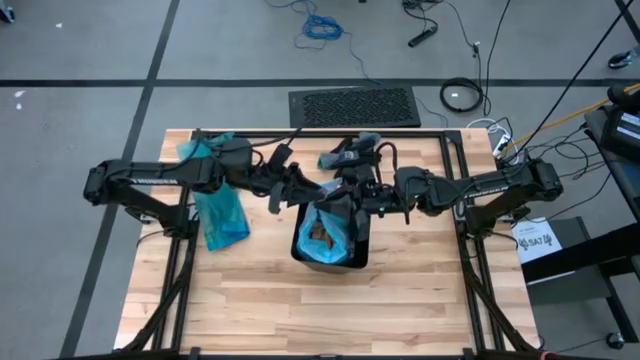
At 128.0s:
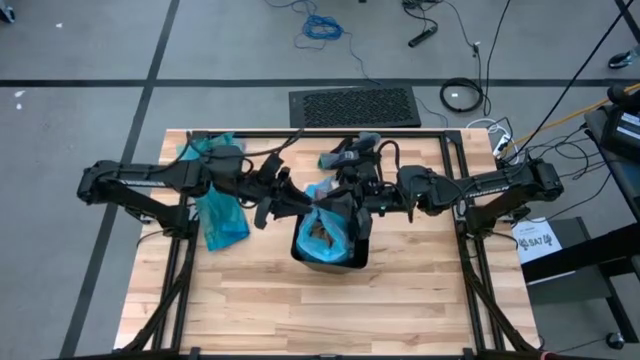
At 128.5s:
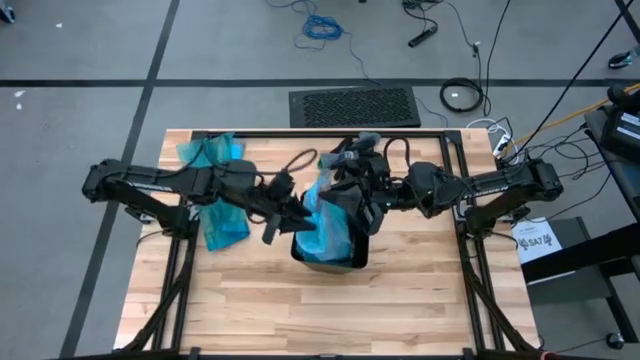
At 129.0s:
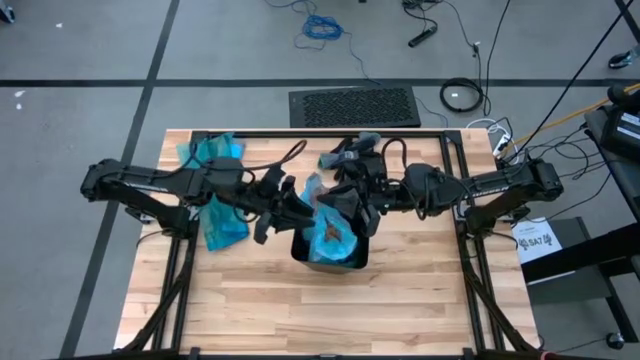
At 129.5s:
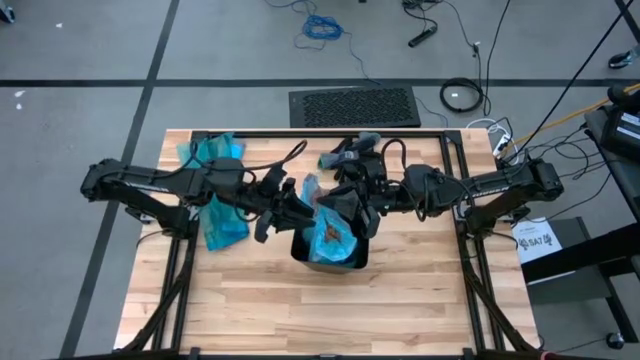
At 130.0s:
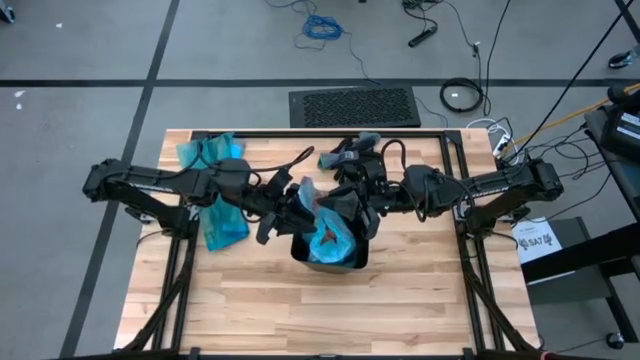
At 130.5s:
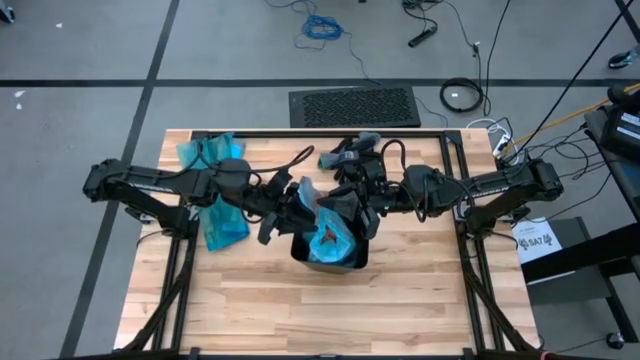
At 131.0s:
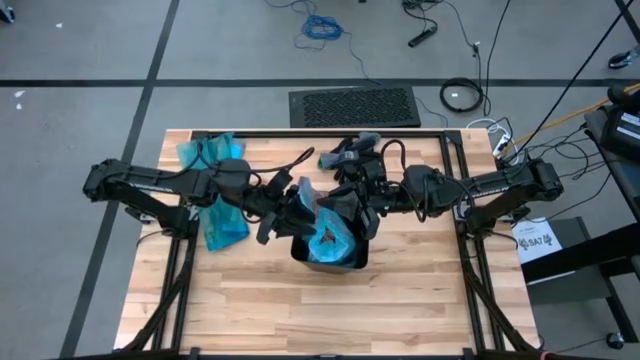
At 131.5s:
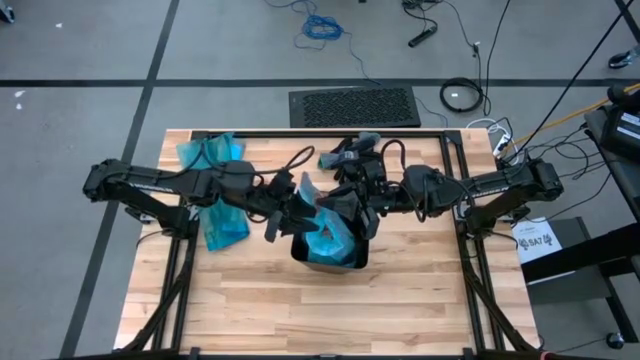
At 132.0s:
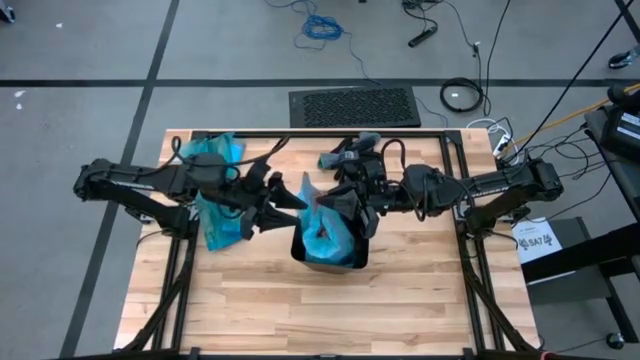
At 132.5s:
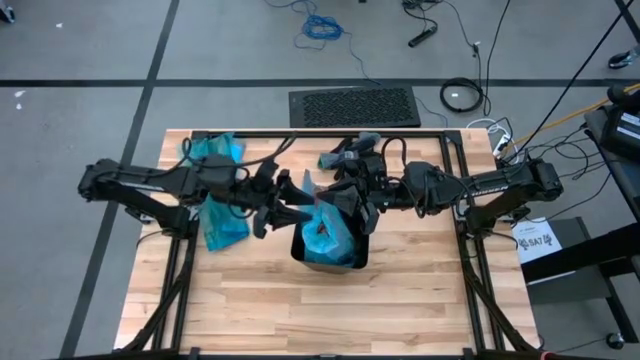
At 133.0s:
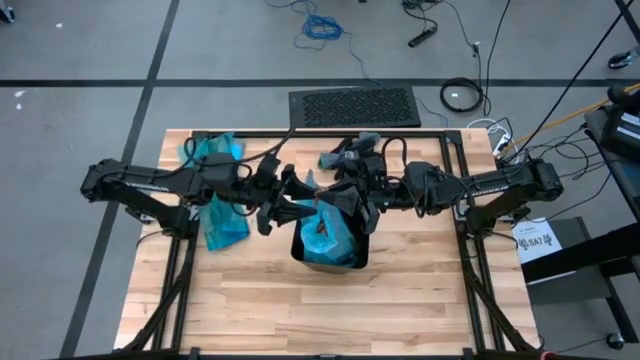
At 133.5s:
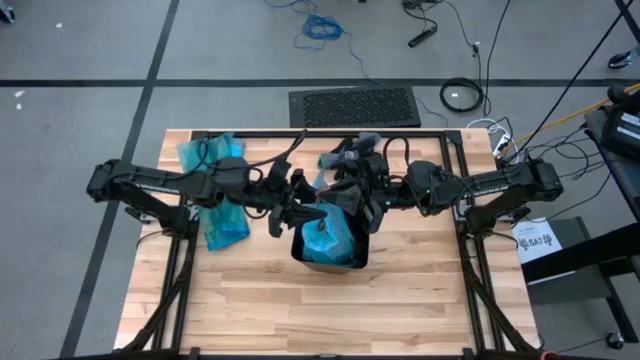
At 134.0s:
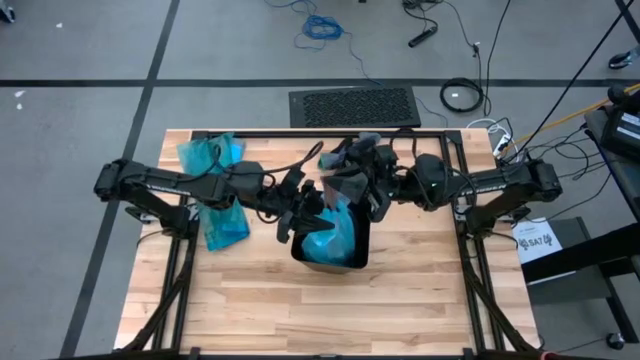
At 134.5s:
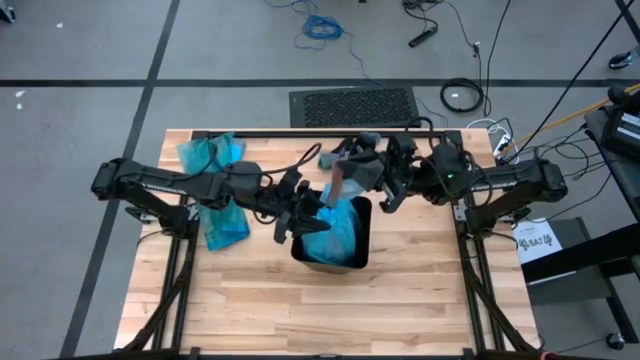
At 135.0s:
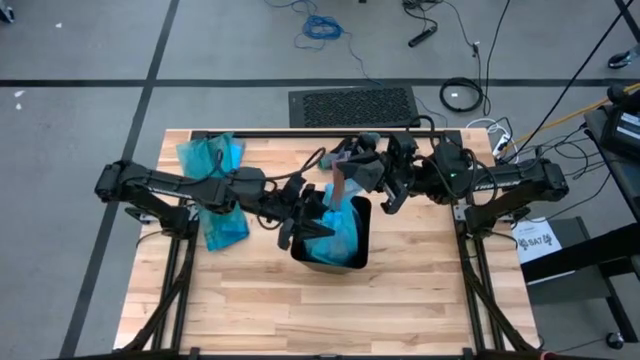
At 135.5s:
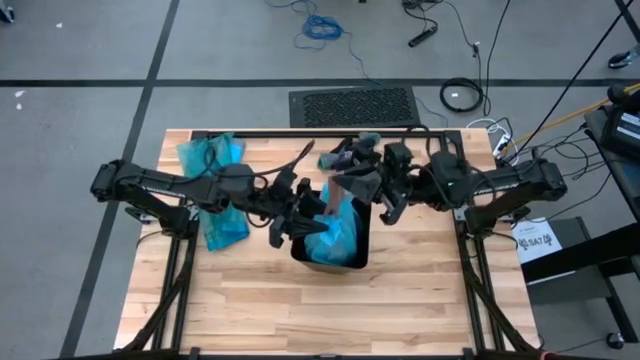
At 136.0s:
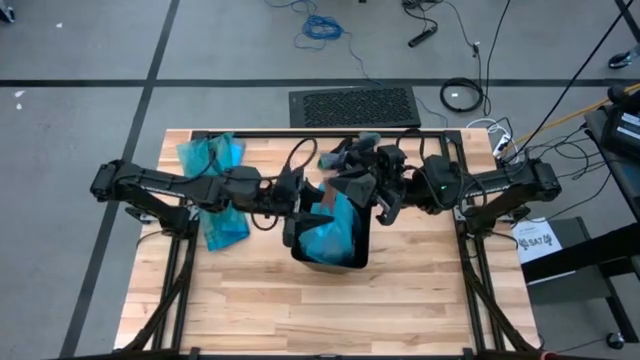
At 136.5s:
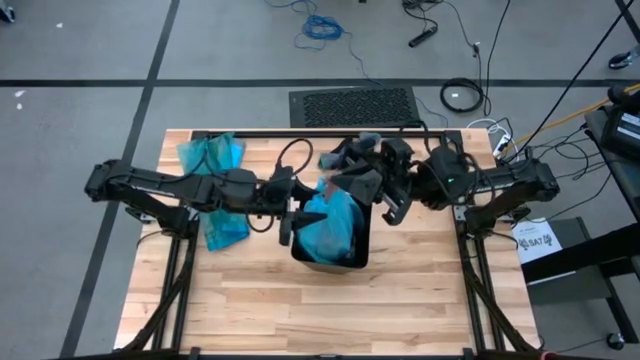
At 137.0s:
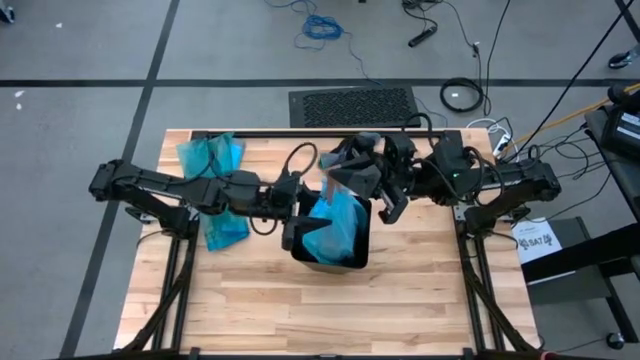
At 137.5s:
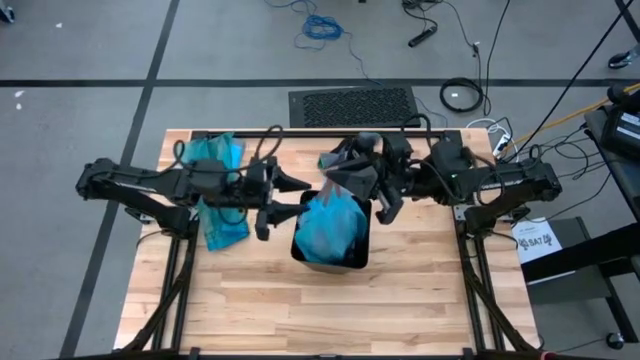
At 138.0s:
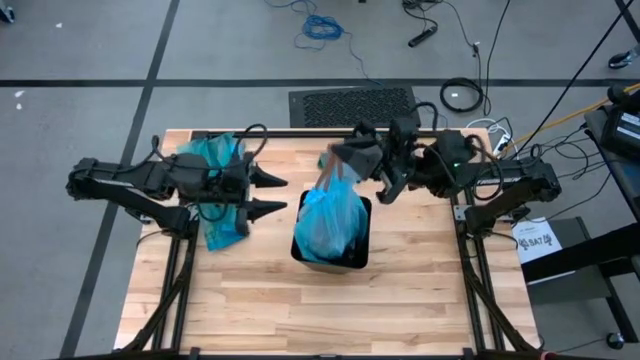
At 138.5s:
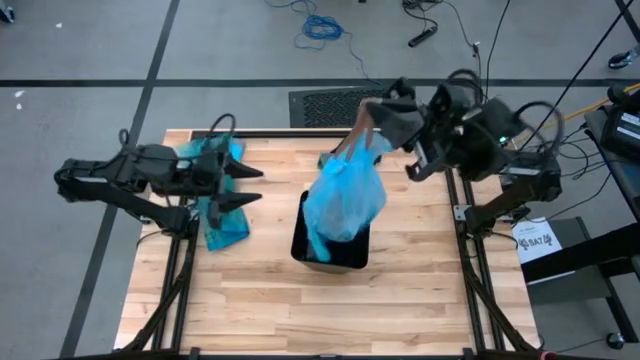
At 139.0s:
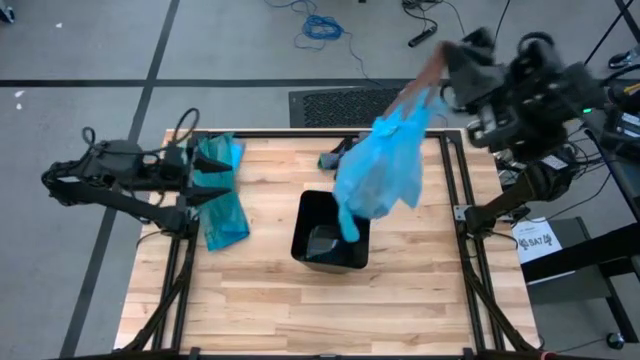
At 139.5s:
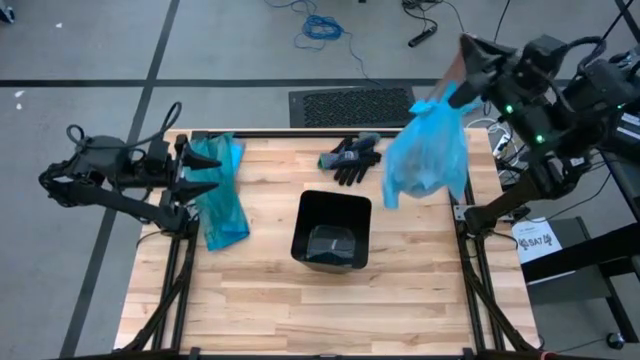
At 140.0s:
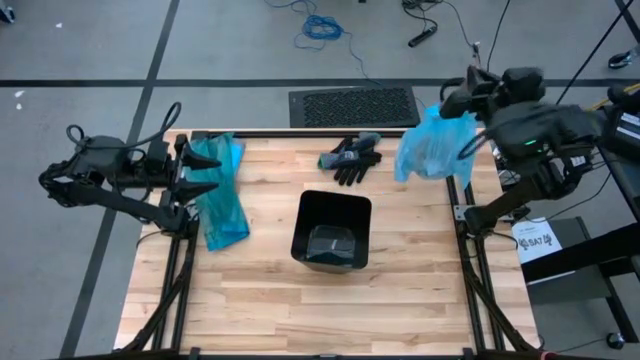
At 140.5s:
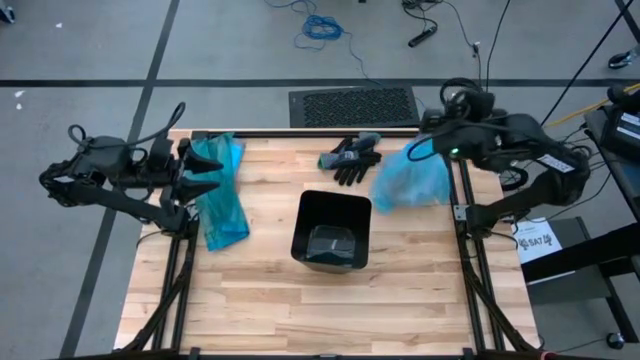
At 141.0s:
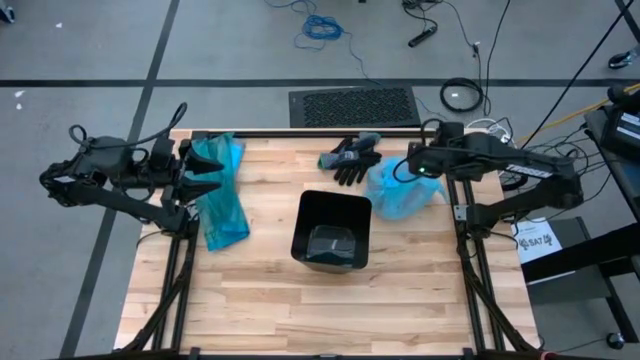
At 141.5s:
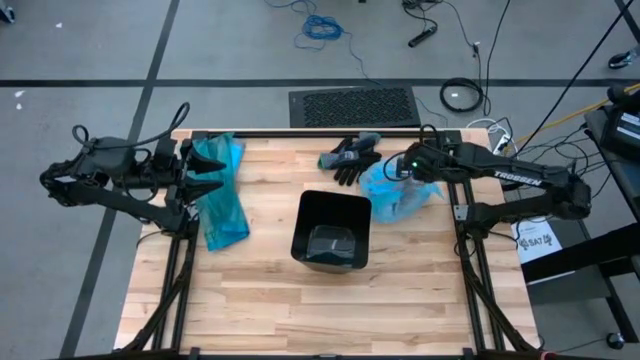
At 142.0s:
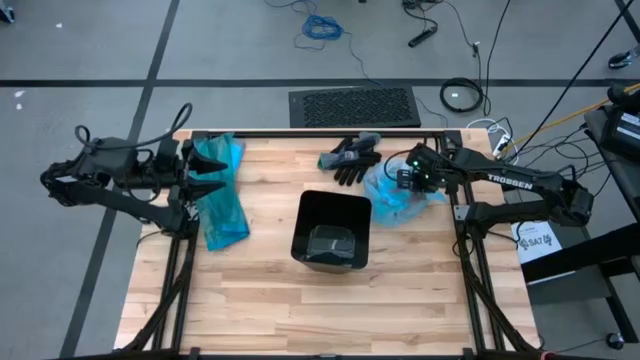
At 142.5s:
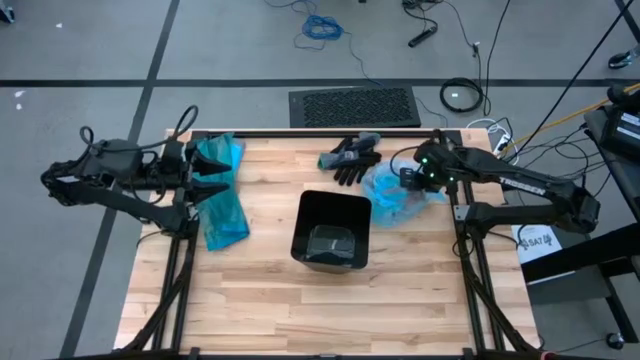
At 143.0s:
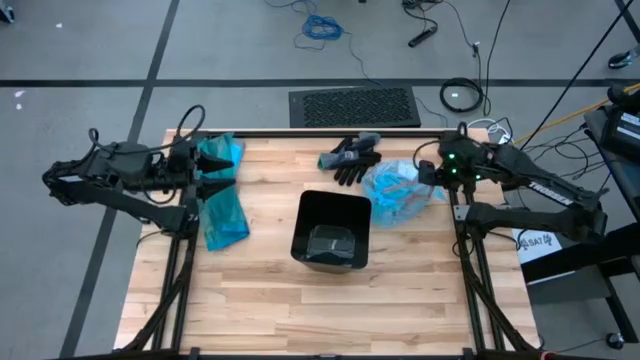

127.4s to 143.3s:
Task: place trash/remove bag and relplace
Remove the blue trash bag from the bin

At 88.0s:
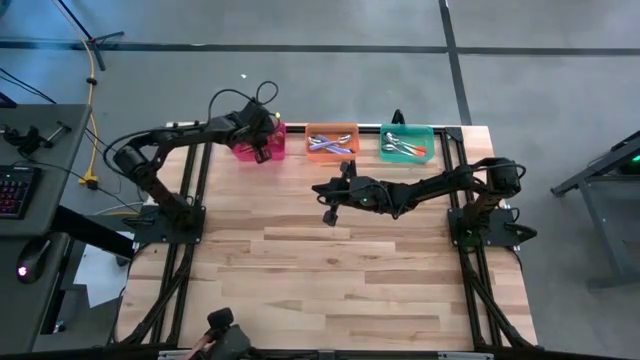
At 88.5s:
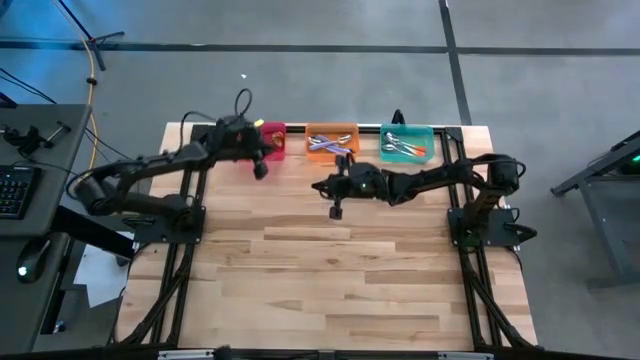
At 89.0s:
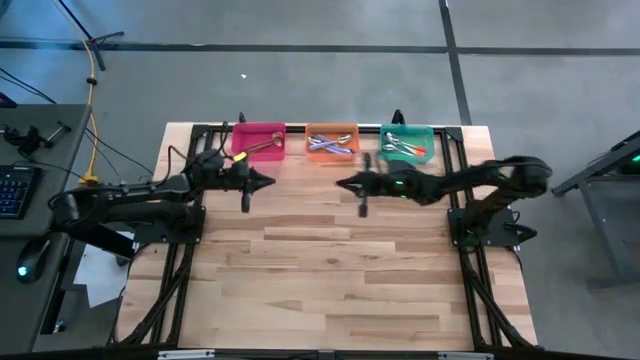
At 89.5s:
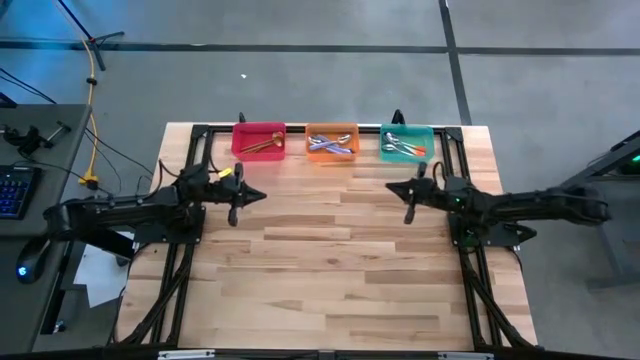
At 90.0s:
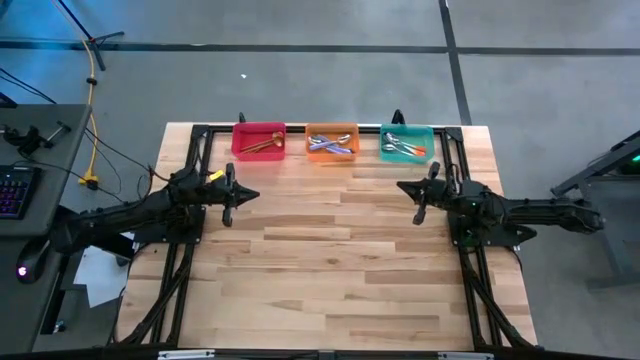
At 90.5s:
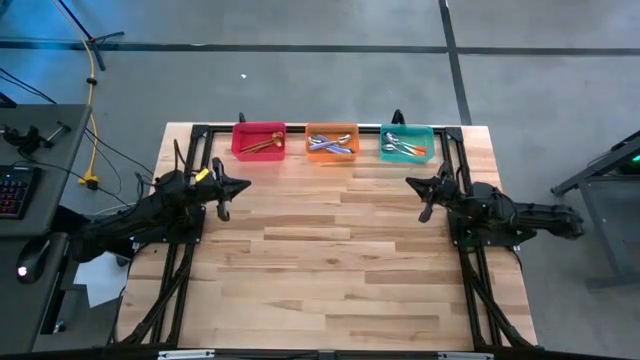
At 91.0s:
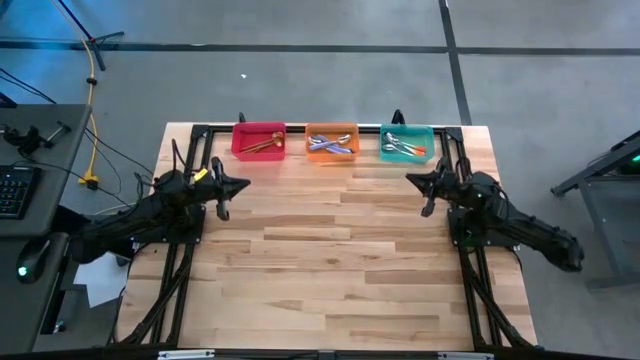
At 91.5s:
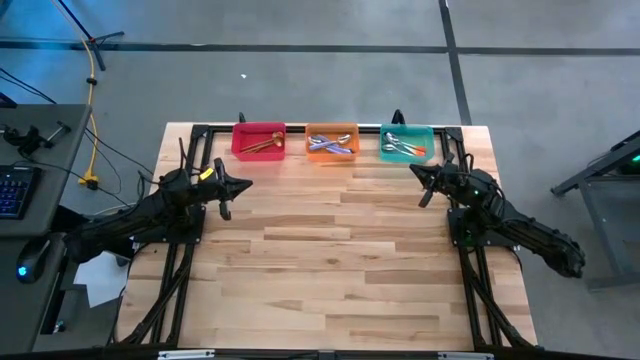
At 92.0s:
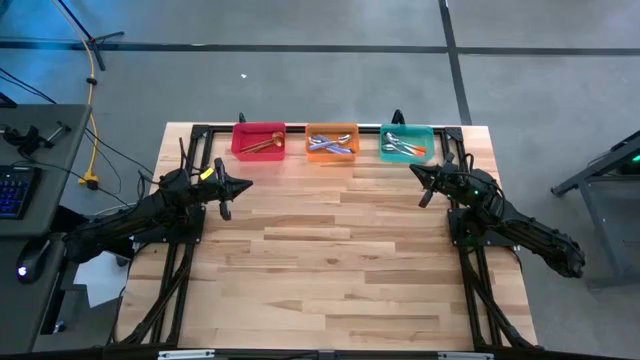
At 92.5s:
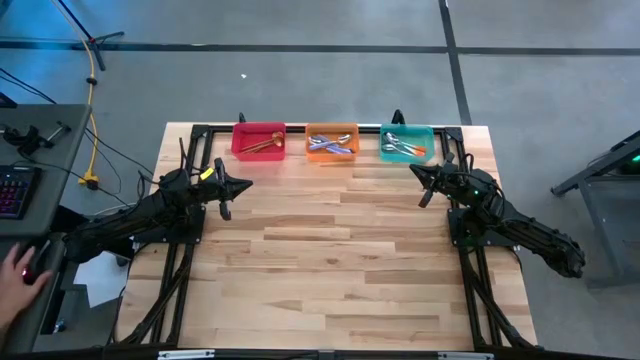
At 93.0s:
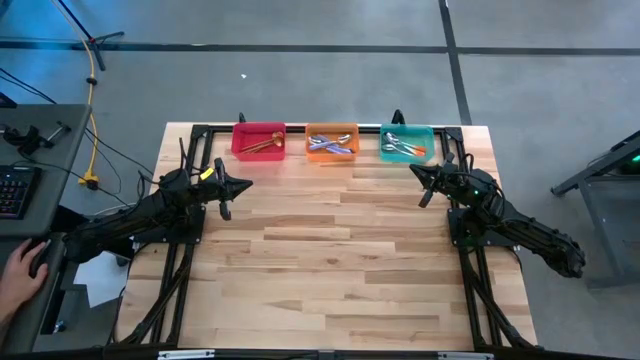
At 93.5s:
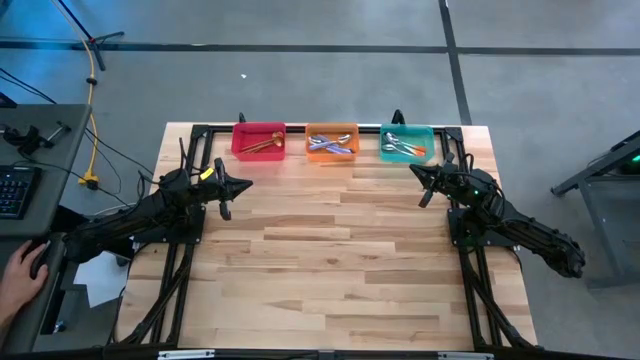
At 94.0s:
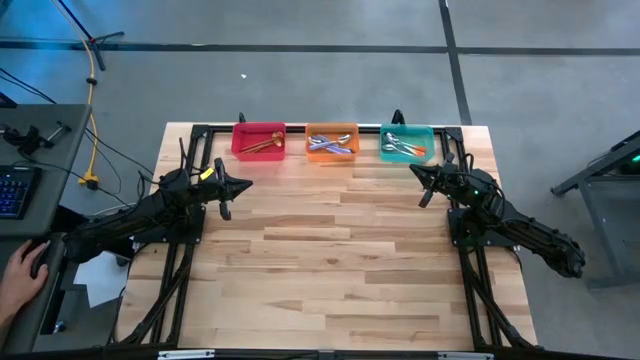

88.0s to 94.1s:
Task: Sort silverware by color (type)
Return to Home Position
